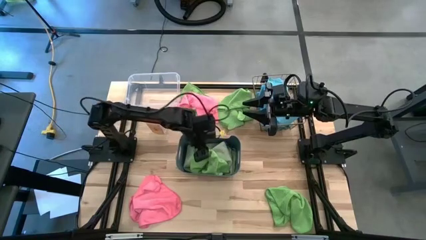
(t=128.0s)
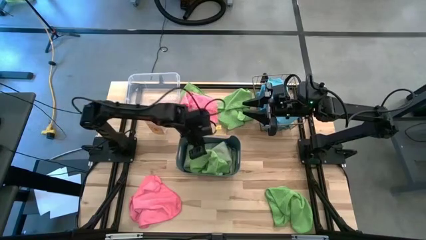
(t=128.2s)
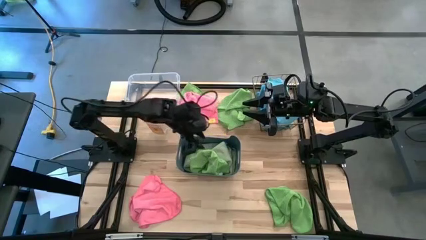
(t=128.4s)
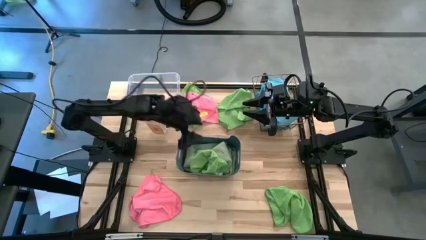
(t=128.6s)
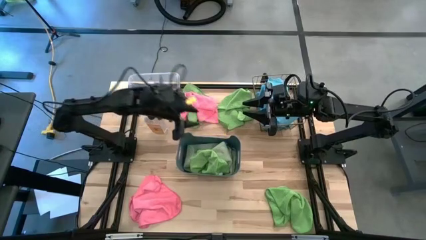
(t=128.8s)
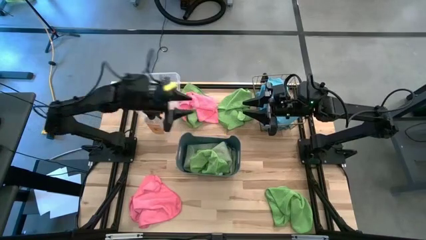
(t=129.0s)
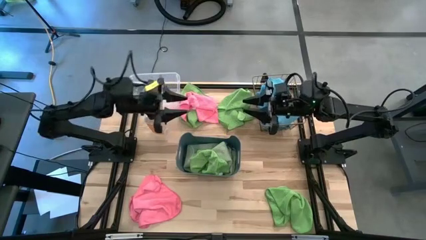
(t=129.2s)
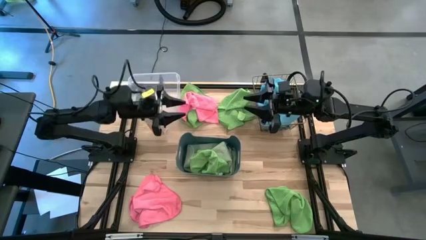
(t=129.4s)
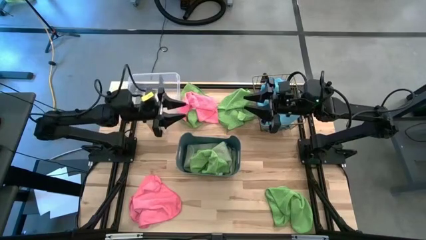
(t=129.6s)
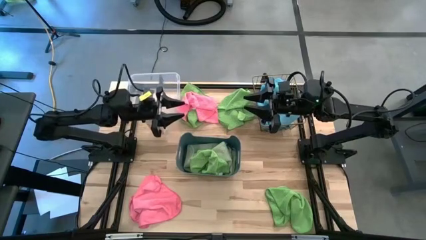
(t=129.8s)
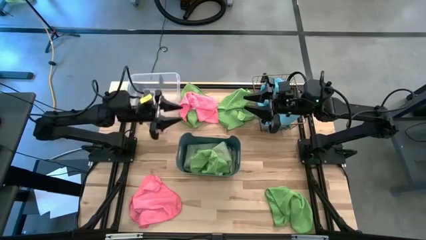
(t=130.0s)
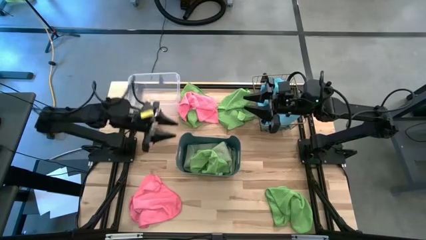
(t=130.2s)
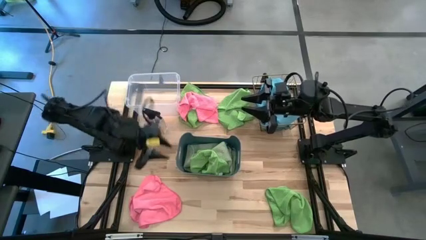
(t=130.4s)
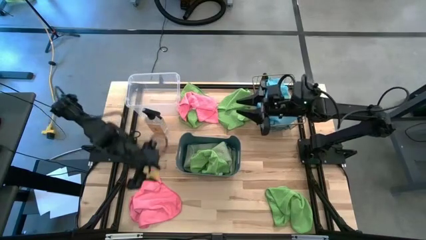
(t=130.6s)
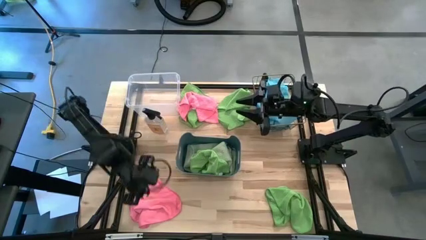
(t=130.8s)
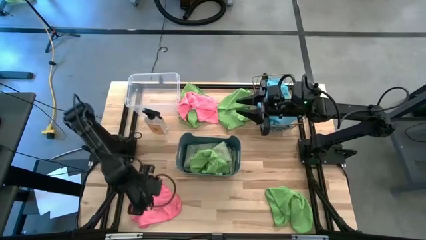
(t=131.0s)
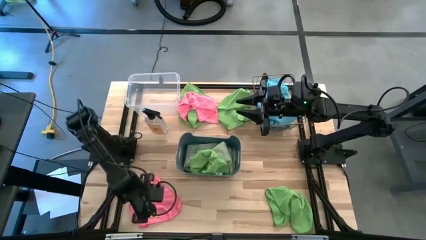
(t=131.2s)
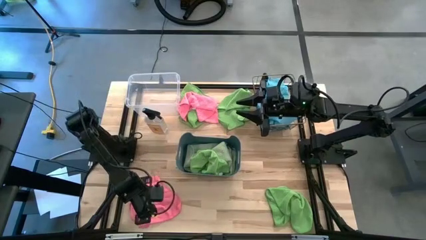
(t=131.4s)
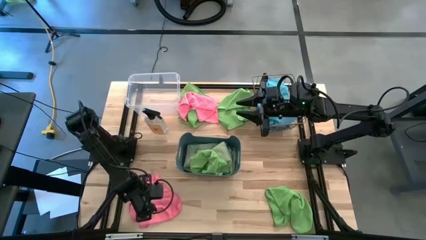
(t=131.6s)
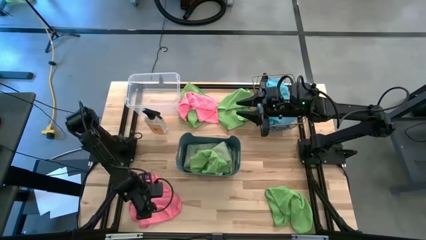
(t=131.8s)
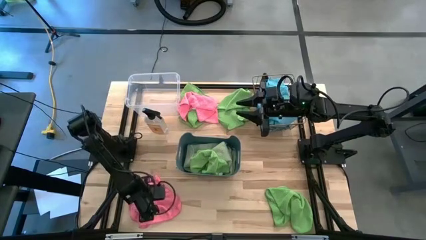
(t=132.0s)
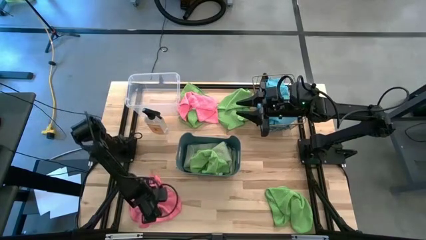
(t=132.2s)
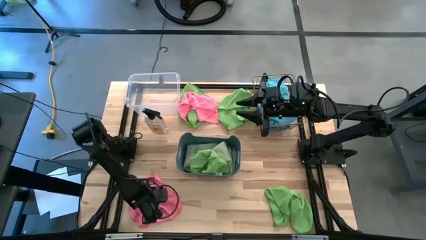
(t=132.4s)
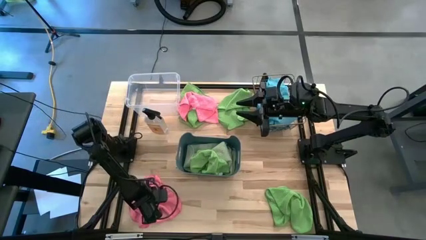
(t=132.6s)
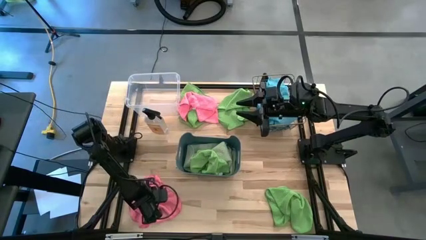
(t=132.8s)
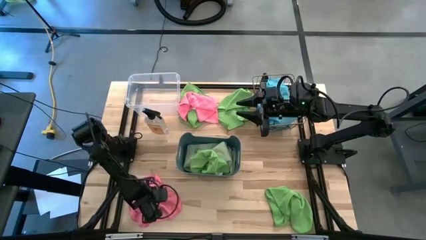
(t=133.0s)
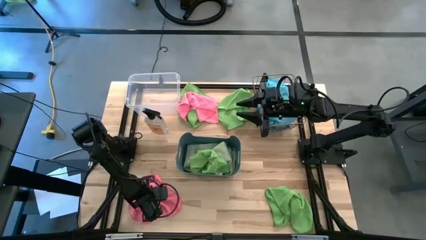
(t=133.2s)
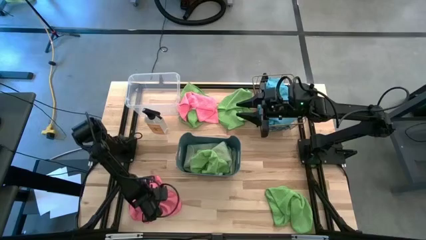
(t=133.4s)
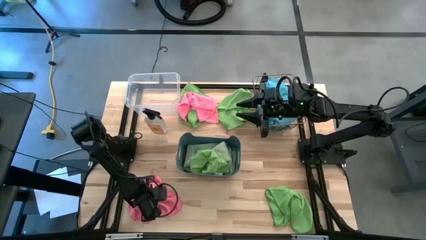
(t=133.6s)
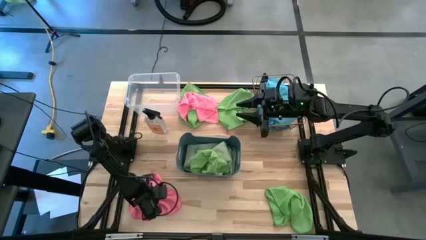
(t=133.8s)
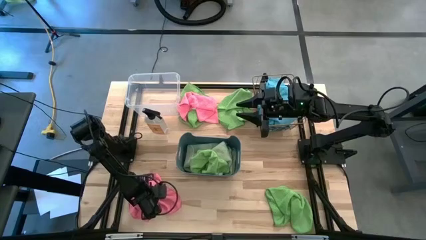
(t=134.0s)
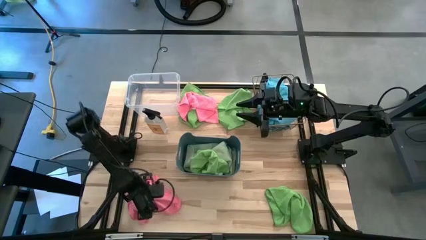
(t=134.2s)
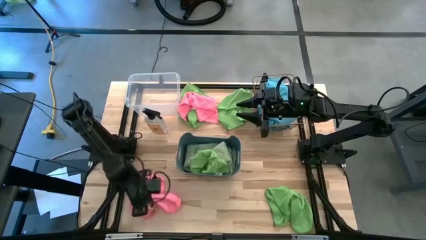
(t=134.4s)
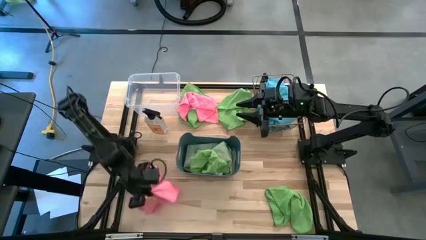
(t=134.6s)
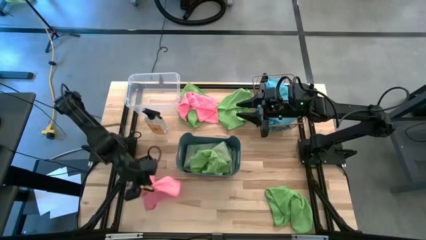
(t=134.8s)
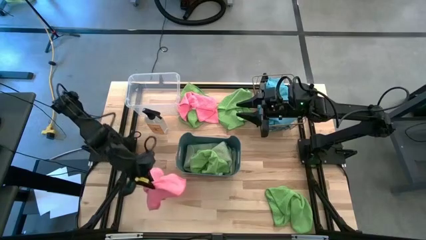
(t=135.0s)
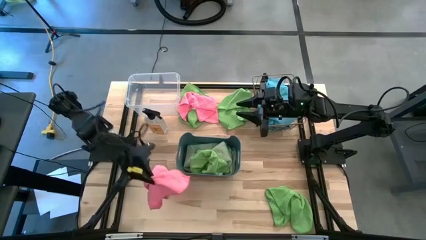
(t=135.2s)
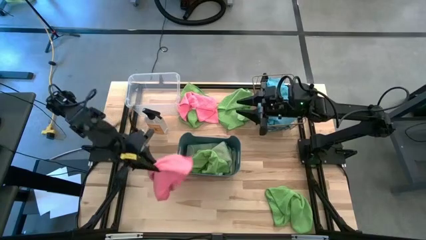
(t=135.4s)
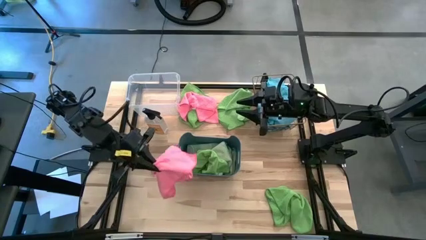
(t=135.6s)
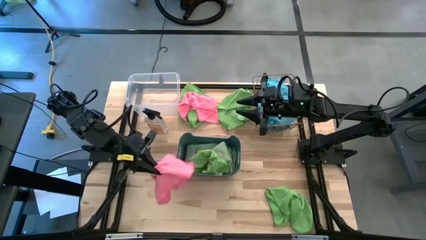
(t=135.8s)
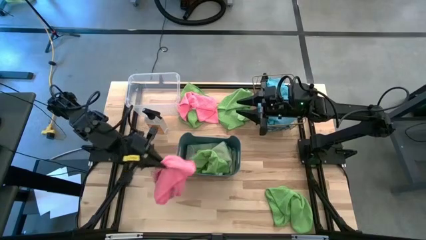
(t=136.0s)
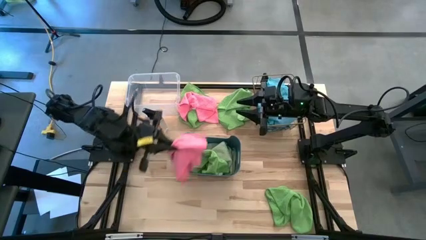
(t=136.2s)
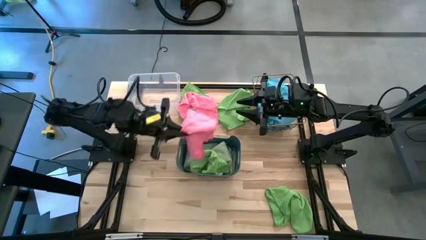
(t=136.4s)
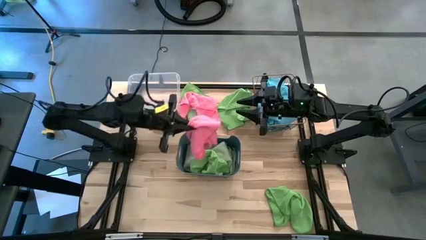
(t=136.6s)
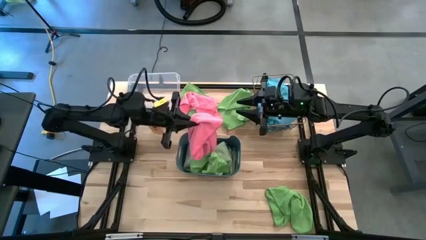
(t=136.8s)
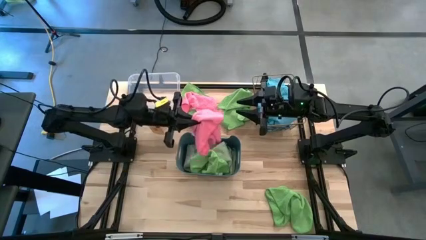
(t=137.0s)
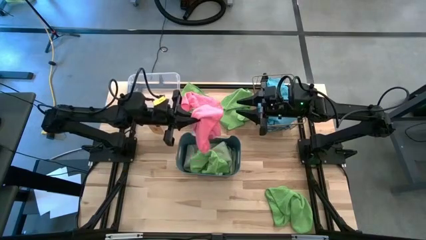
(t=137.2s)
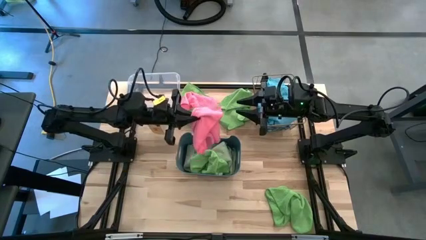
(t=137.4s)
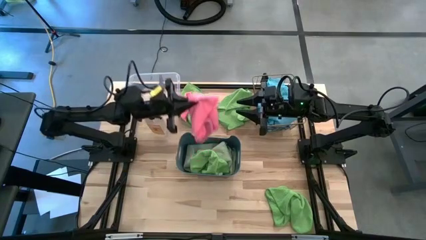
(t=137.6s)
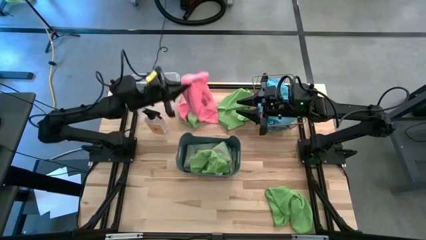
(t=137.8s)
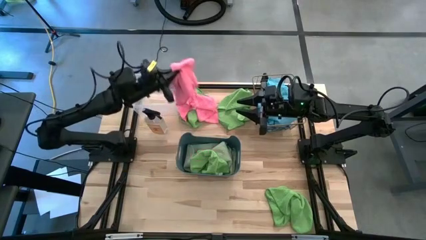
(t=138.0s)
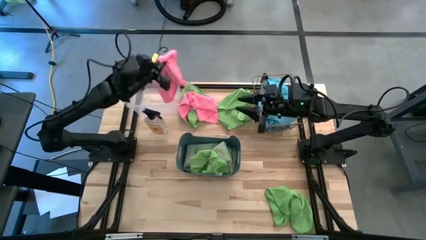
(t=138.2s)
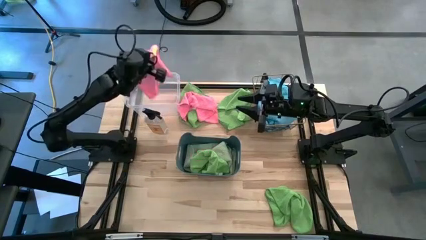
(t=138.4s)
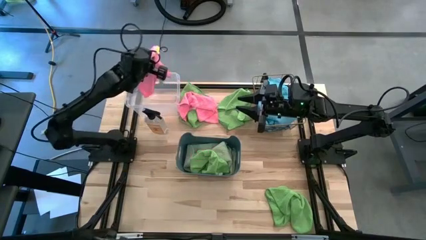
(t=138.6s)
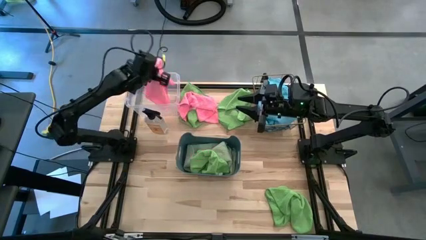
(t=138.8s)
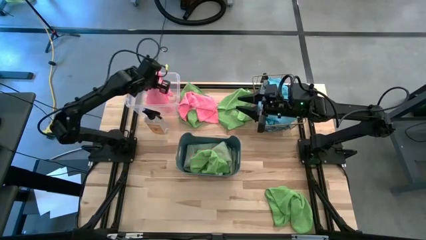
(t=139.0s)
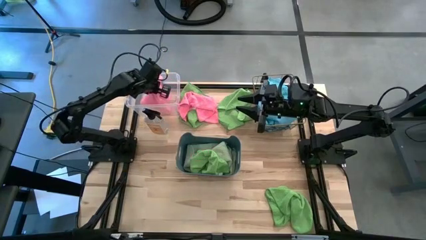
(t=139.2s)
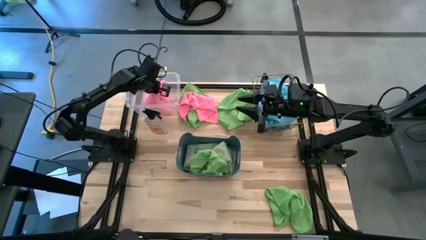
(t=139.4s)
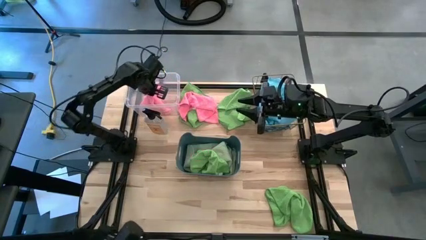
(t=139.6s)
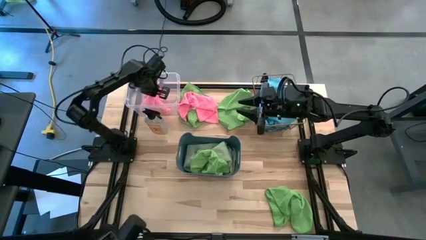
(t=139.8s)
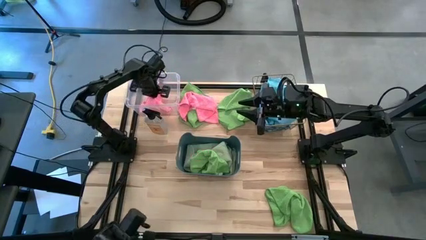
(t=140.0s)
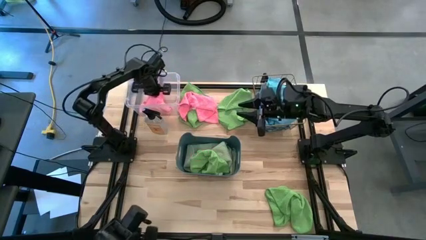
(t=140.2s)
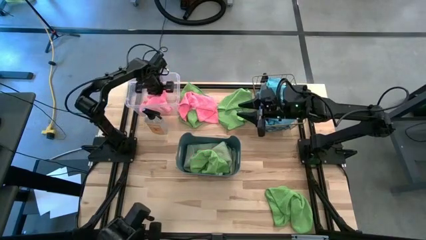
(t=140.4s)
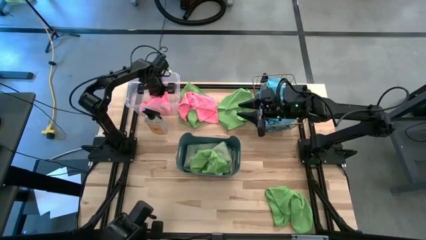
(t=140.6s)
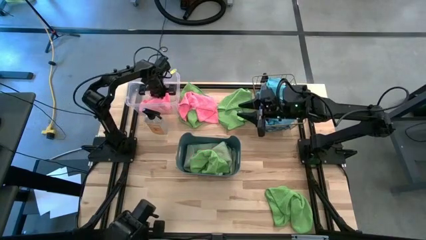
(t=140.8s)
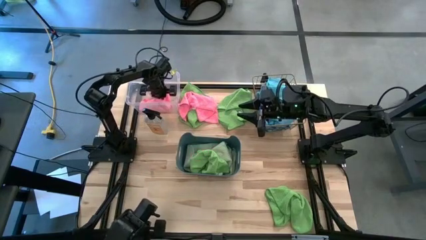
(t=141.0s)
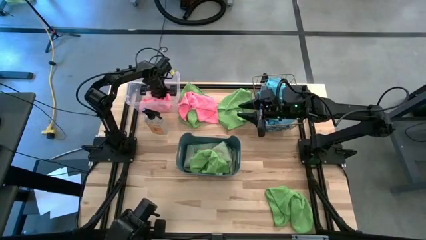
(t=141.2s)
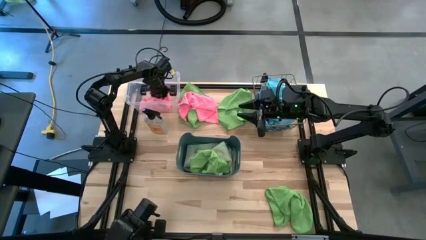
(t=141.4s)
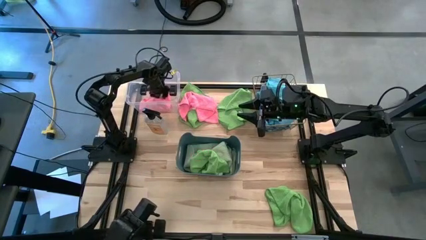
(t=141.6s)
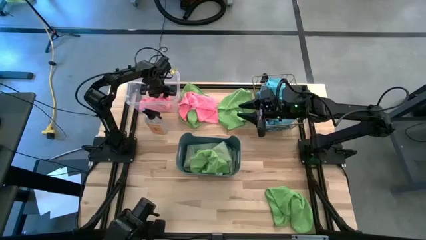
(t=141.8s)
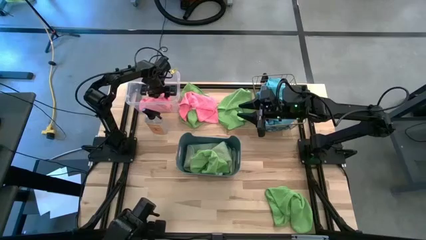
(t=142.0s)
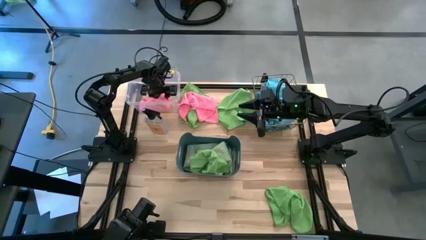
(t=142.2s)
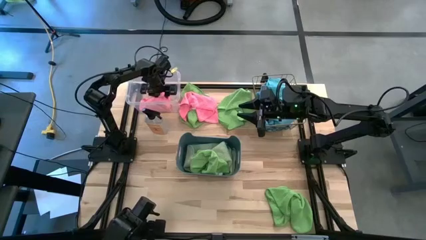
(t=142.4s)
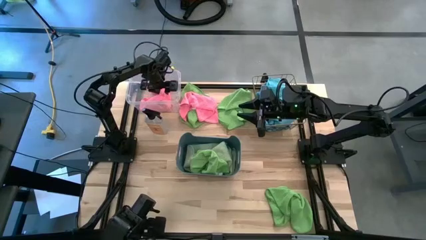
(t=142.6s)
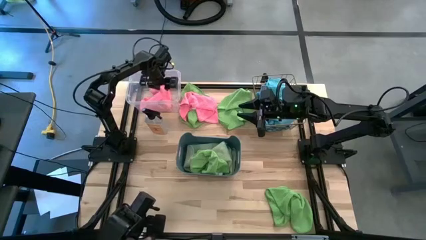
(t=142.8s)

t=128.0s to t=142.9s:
Task: Sort microfiber towel by color & place in baskets
Put the pink microfiber cloth into the transparent bin
